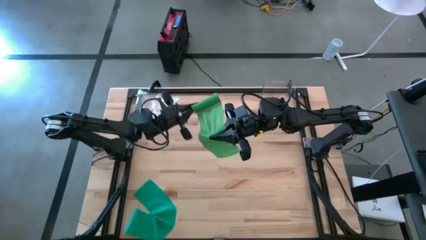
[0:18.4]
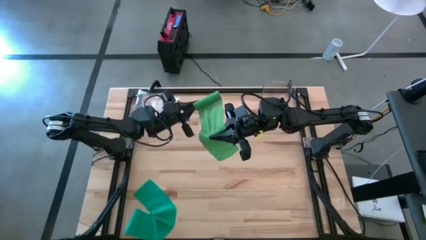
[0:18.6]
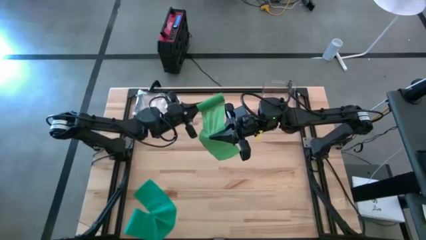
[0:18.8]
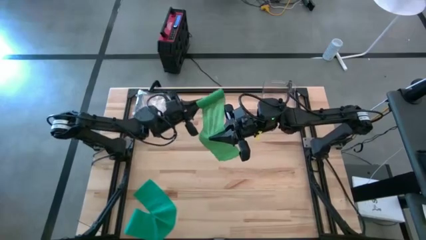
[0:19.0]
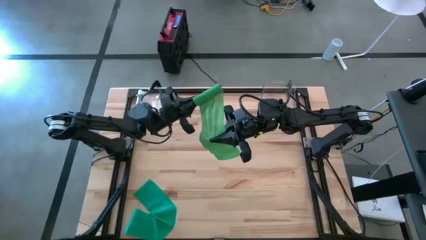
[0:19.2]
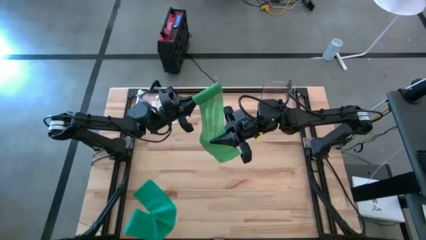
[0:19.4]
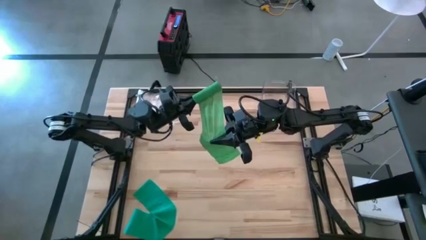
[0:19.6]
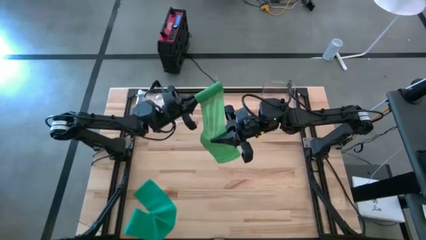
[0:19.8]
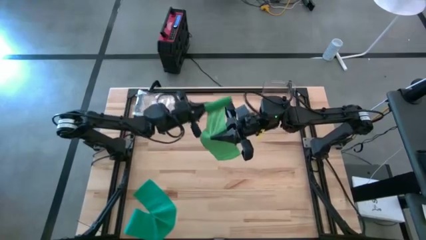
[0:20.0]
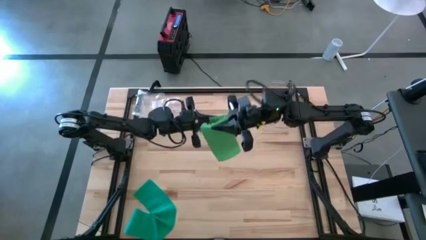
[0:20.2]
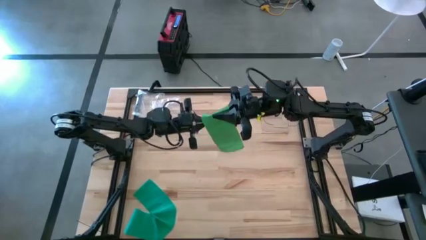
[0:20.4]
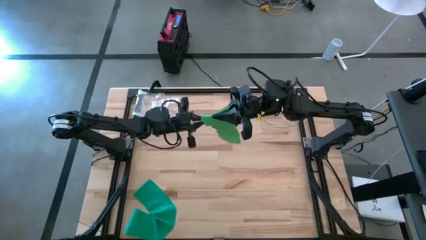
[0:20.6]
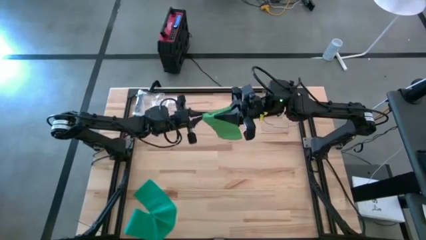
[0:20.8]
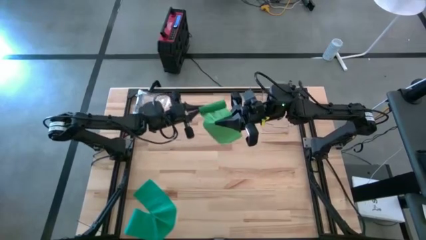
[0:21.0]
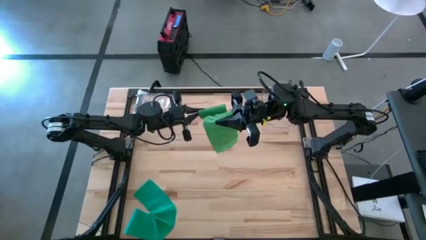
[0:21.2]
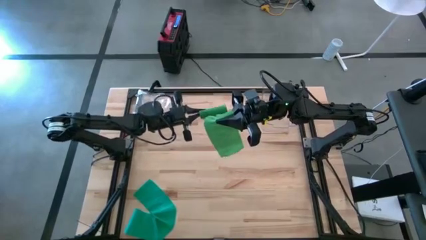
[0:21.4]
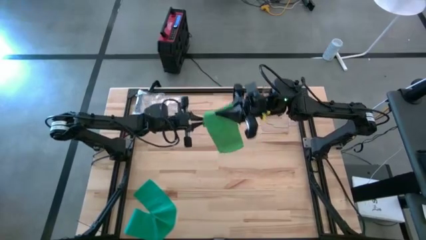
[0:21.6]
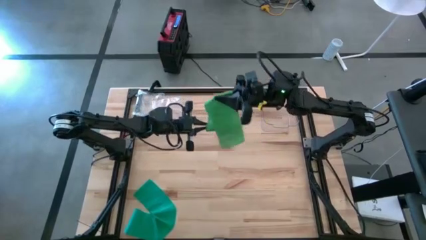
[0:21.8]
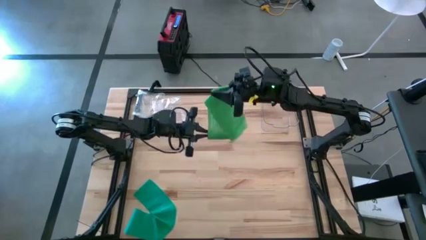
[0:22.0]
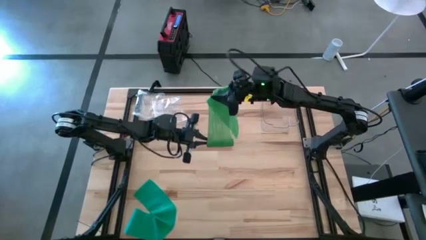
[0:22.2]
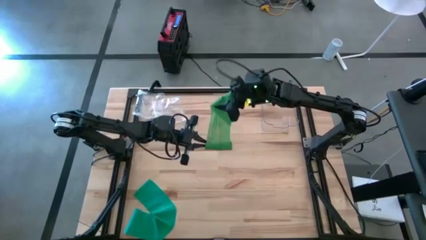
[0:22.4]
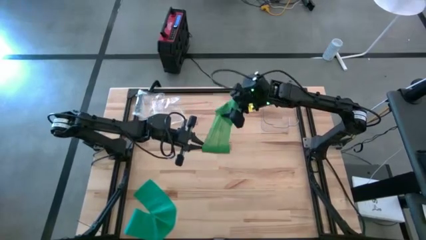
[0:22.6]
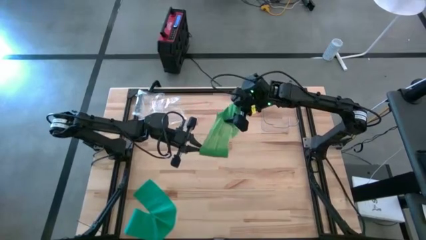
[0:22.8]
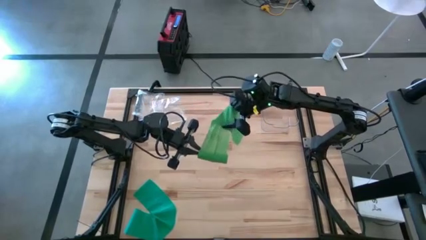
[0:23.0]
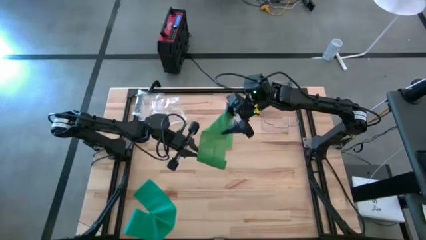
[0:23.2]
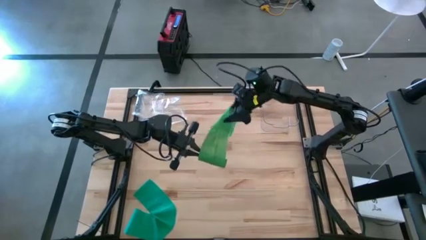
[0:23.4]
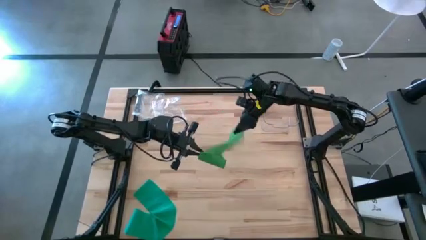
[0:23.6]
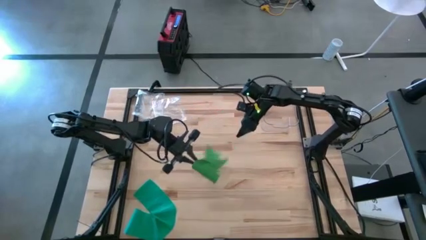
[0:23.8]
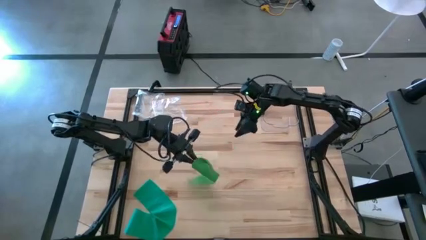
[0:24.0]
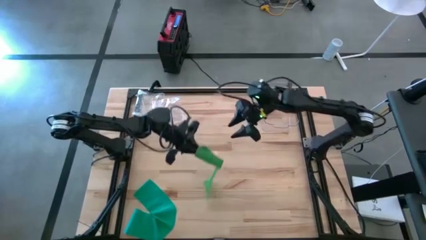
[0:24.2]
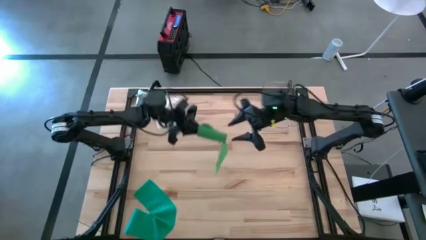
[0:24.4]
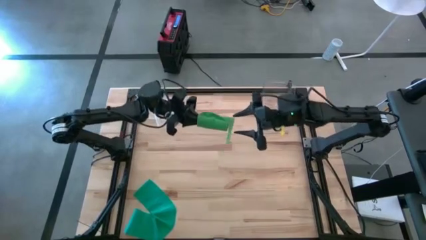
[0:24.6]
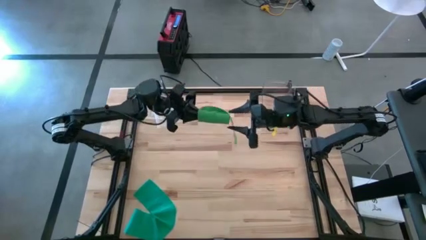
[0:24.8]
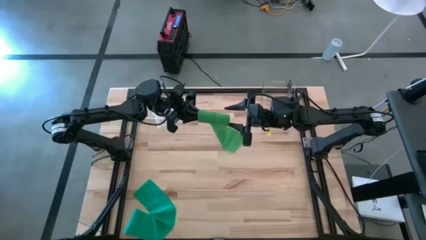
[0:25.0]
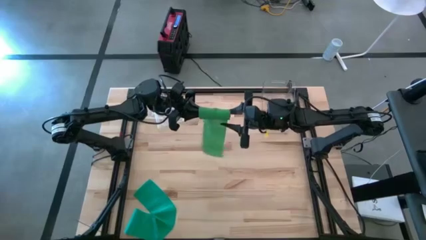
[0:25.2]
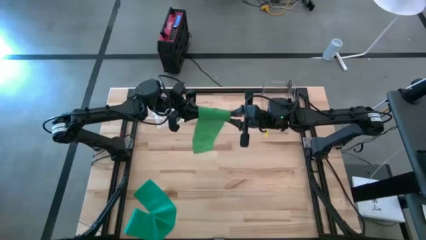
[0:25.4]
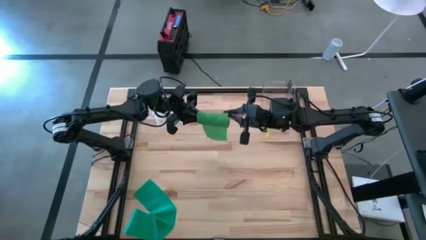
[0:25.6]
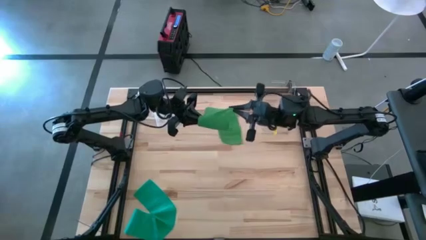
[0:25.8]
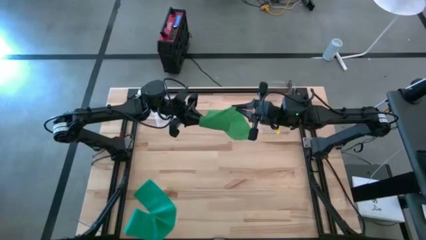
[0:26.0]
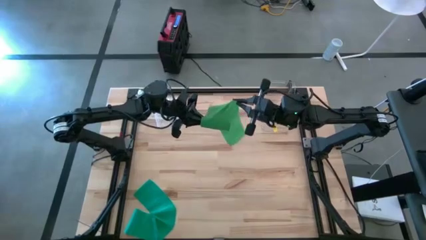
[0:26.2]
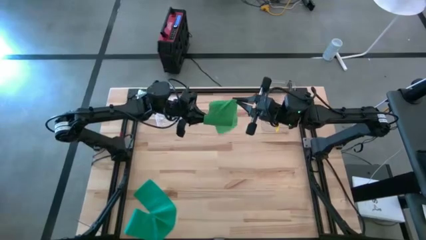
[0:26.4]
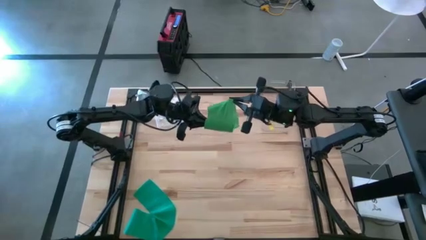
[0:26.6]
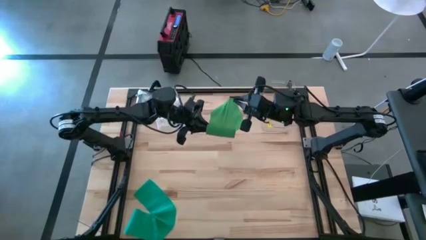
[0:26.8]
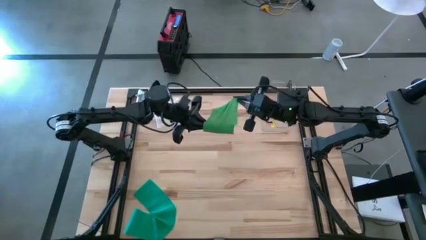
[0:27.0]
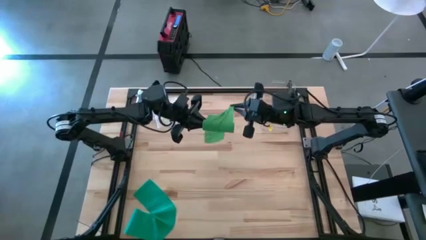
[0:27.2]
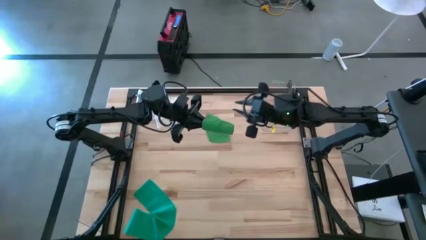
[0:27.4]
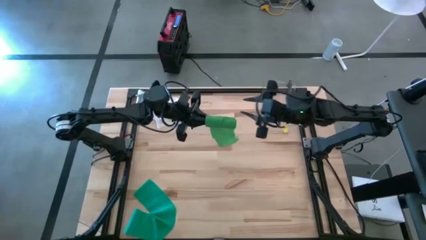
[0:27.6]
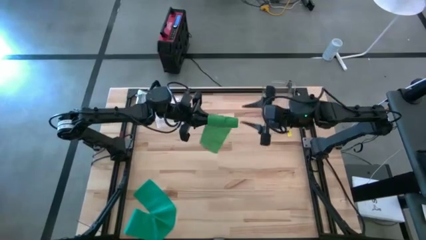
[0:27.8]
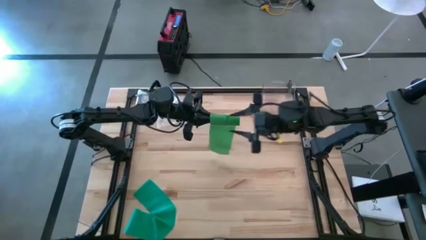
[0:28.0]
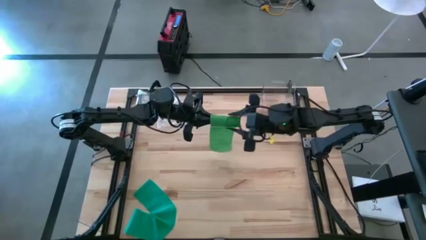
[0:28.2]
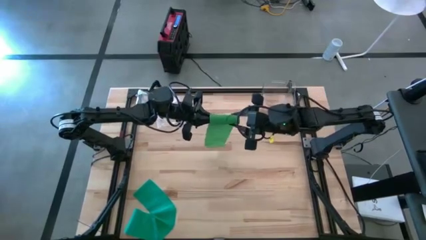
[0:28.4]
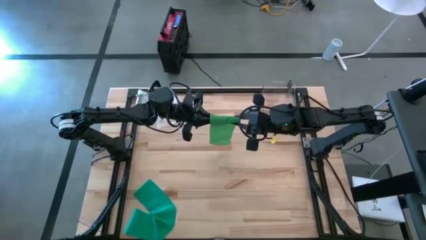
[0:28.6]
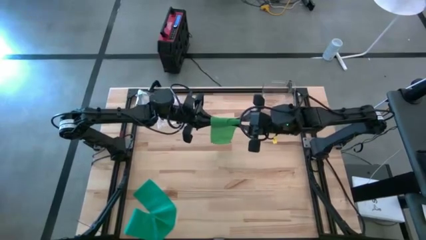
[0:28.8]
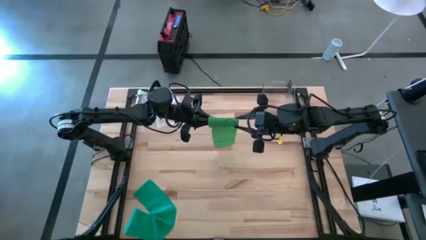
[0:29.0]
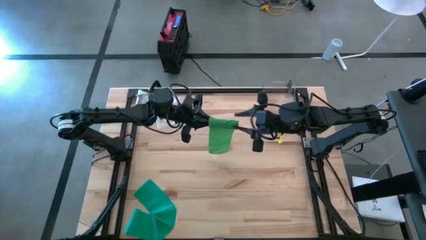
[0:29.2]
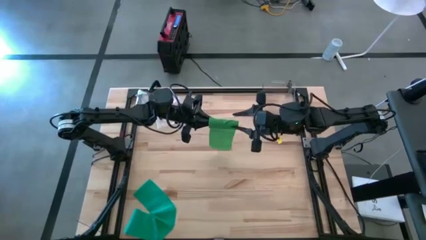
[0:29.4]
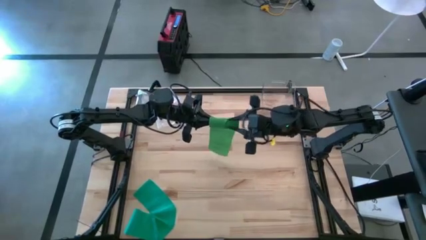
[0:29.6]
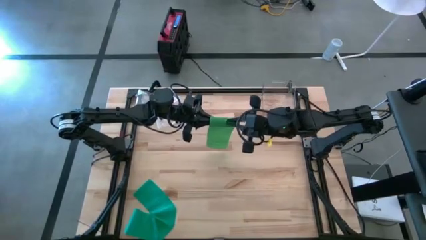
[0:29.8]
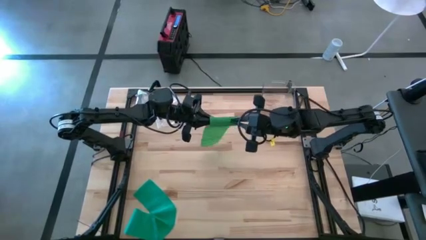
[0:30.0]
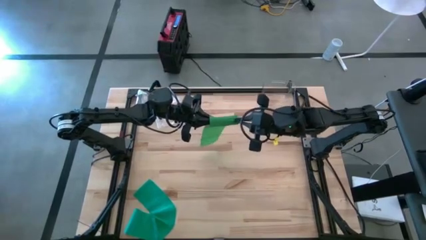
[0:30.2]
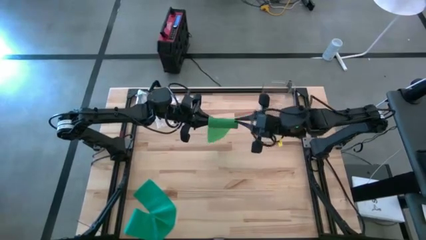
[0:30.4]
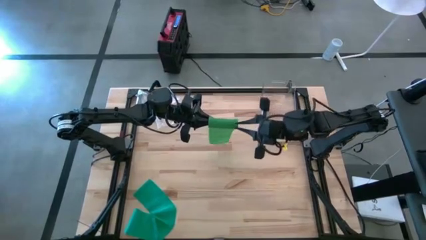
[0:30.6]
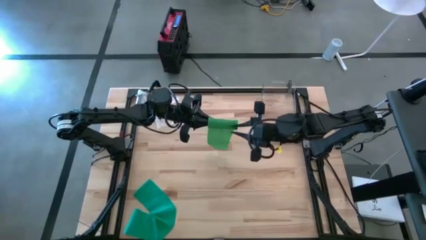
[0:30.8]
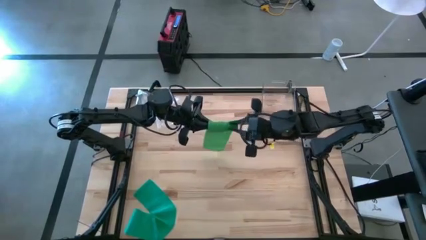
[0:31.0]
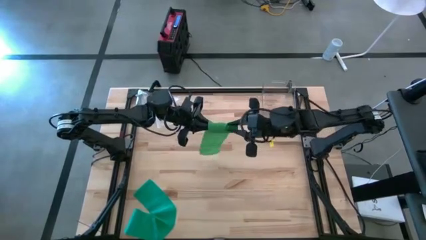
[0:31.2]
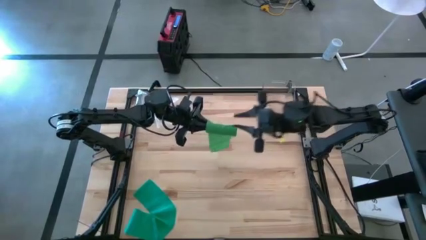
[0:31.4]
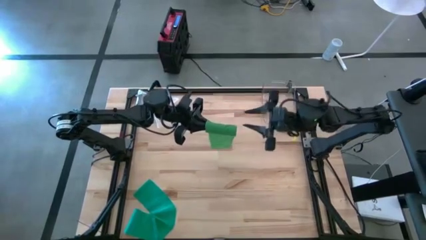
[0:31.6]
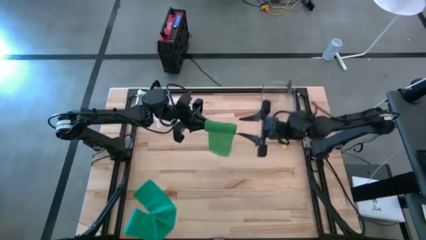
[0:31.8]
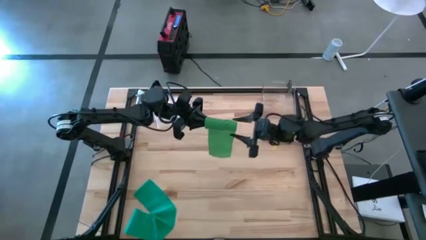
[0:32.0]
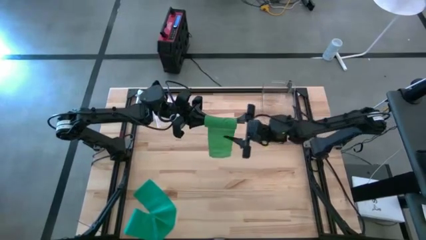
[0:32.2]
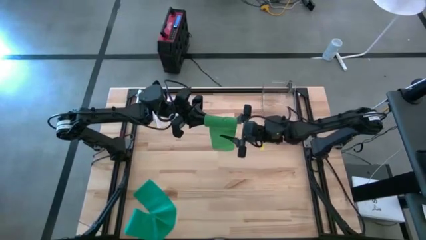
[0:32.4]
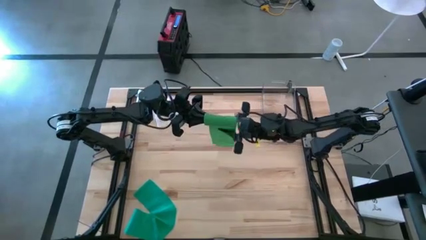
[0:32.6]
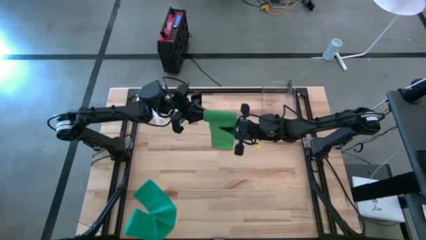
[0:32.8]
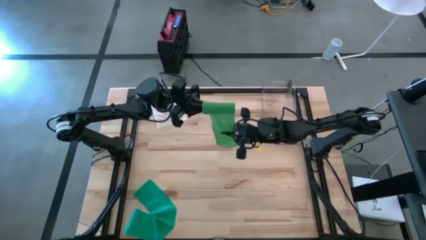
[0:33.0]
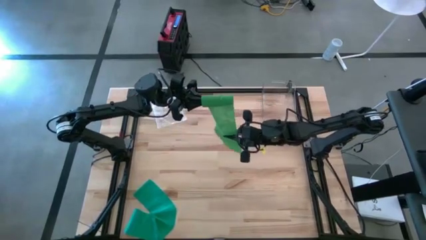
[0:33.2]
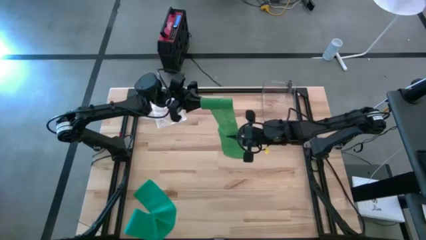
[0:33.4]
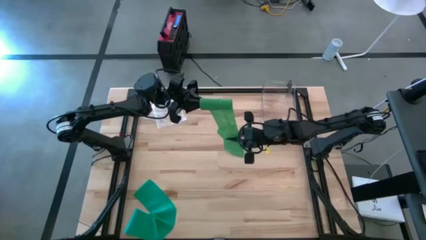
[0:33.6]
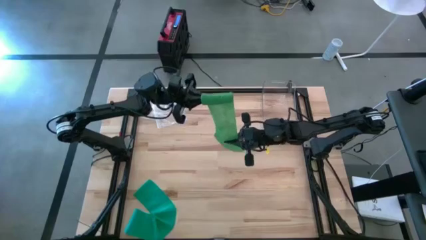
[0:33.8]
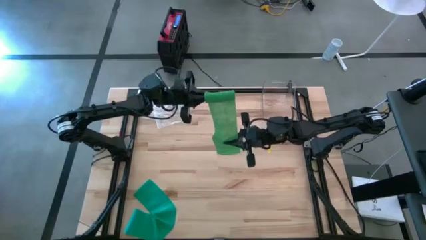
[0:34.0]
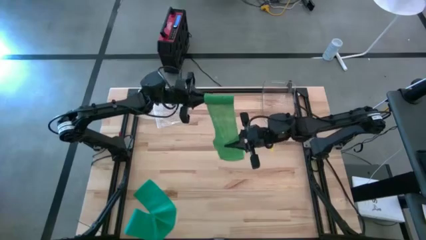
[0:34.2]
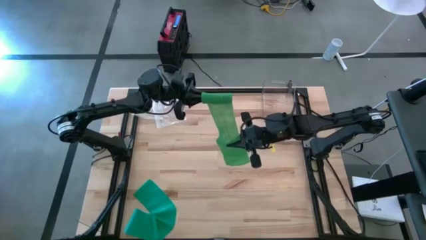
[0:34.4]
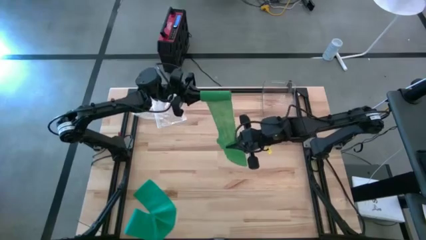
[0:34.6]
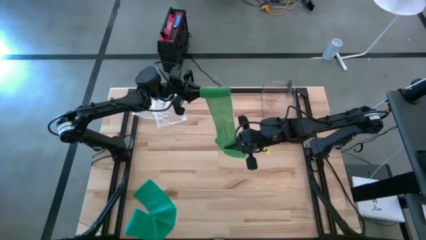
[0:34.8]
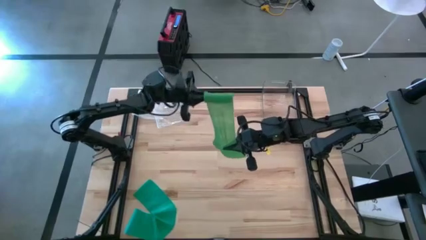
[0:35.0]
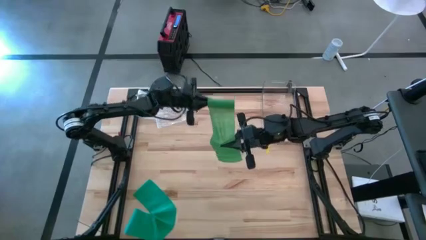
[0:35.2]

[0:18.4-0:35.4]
Task: Roll bandage
Roll the green bandage
